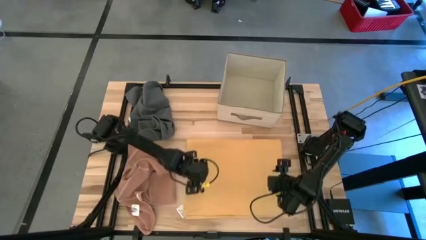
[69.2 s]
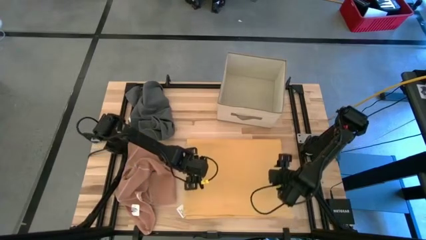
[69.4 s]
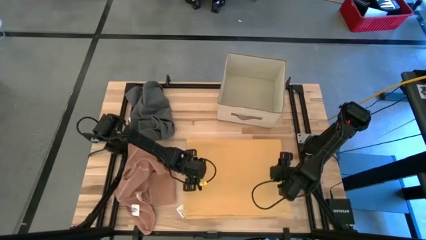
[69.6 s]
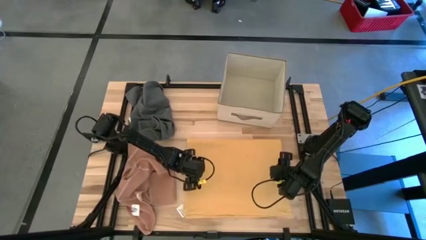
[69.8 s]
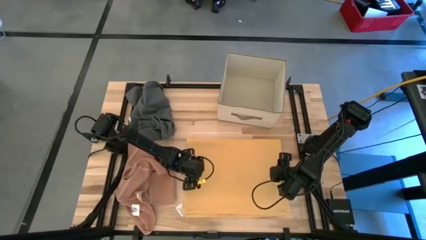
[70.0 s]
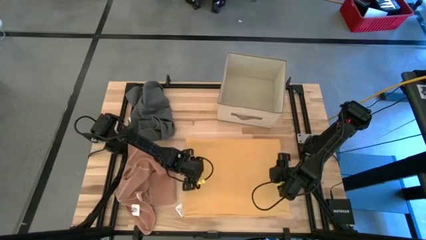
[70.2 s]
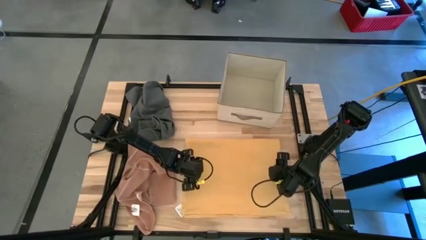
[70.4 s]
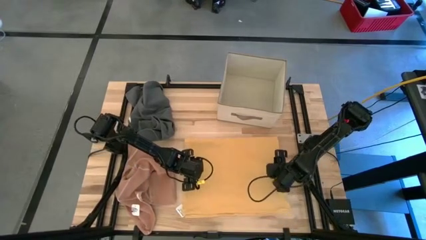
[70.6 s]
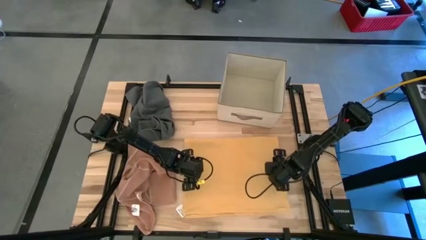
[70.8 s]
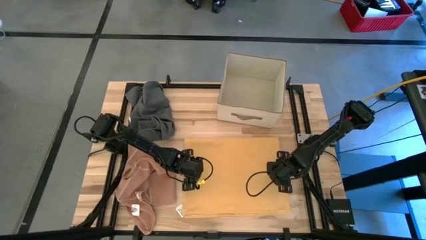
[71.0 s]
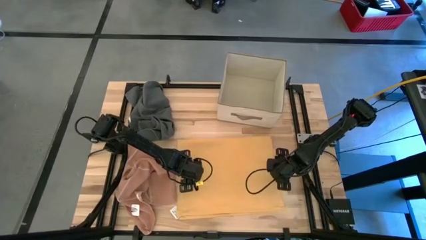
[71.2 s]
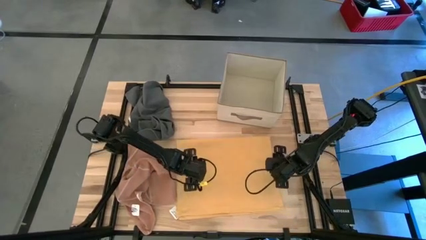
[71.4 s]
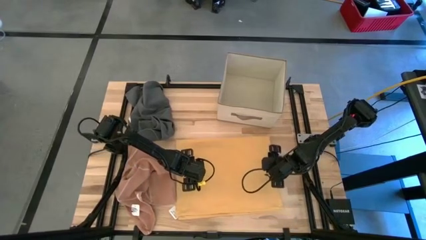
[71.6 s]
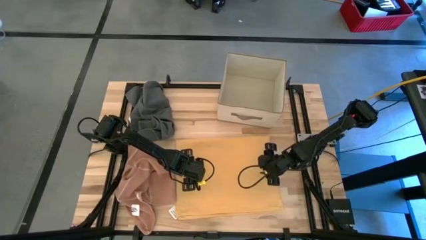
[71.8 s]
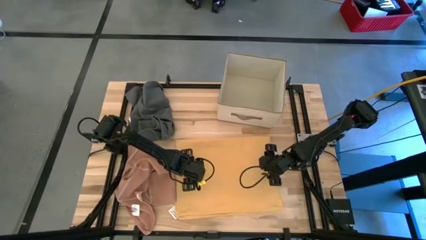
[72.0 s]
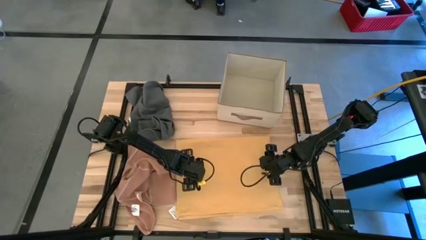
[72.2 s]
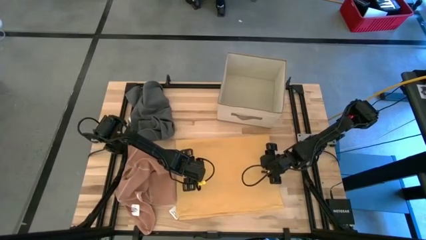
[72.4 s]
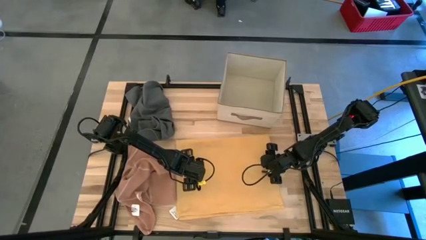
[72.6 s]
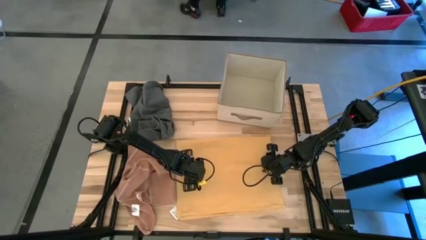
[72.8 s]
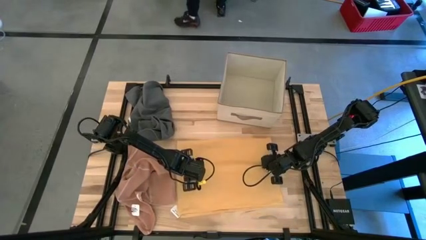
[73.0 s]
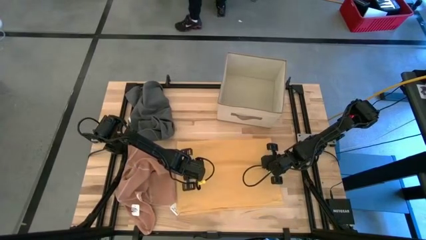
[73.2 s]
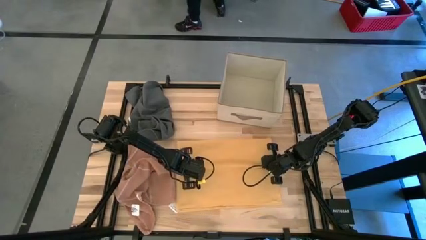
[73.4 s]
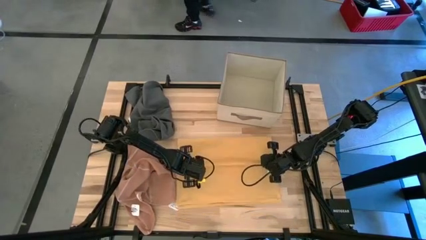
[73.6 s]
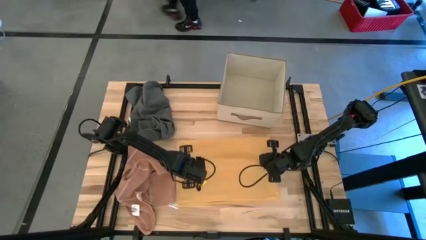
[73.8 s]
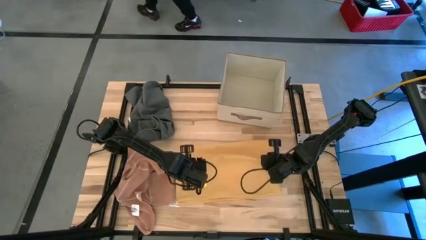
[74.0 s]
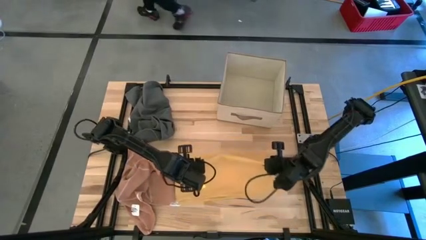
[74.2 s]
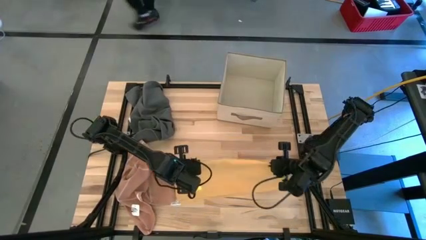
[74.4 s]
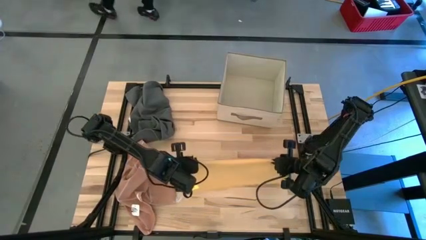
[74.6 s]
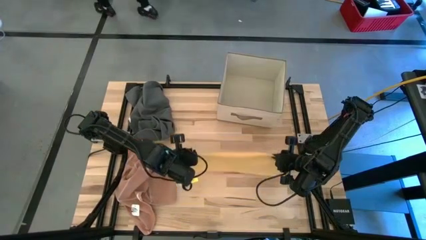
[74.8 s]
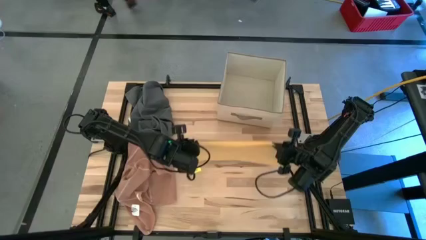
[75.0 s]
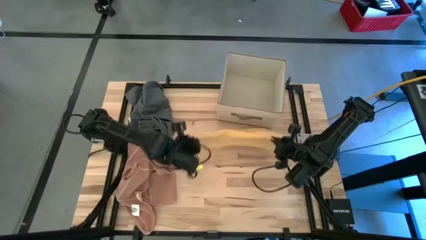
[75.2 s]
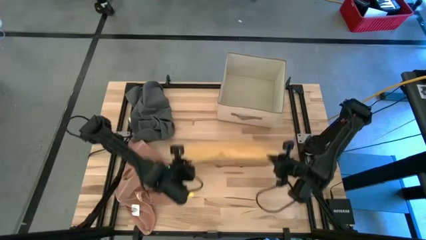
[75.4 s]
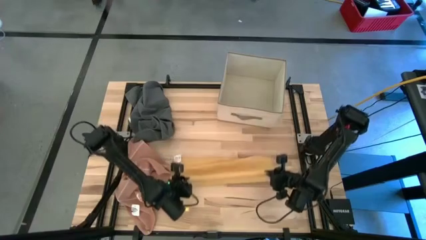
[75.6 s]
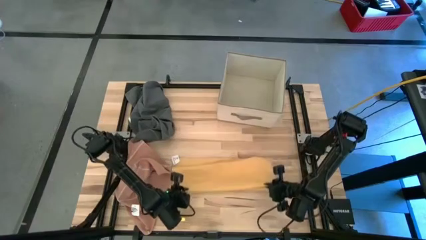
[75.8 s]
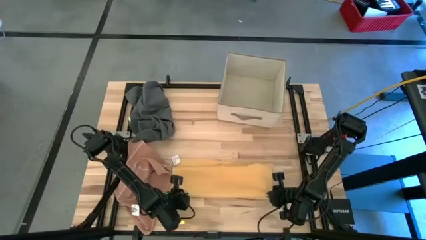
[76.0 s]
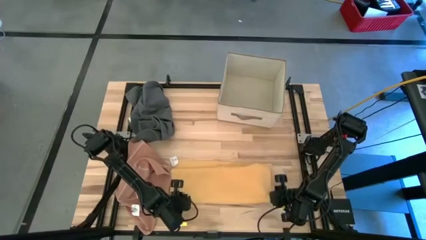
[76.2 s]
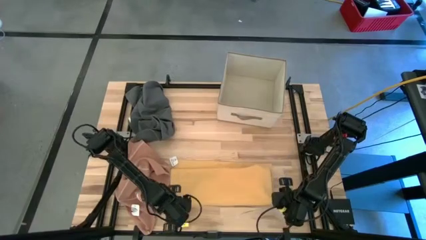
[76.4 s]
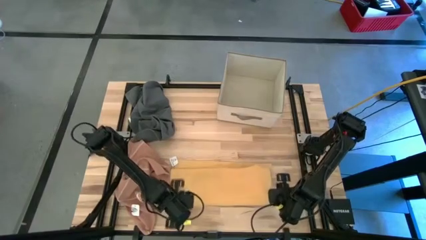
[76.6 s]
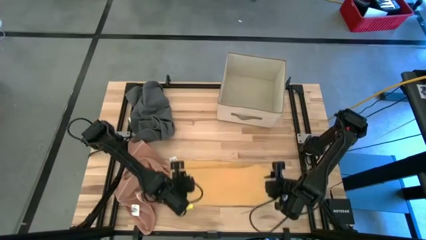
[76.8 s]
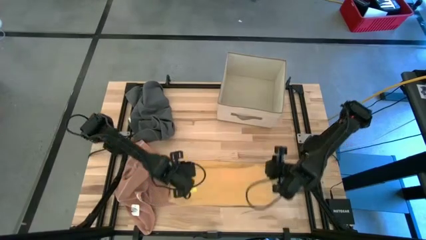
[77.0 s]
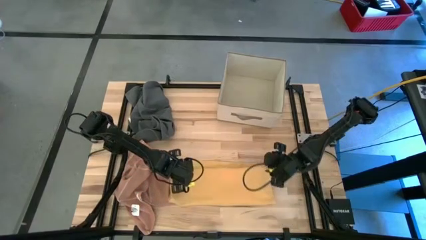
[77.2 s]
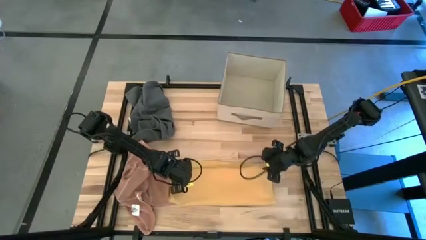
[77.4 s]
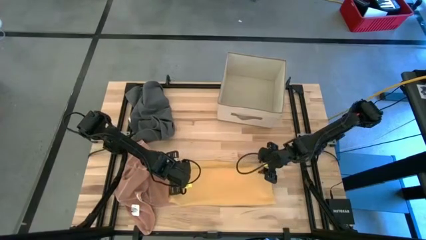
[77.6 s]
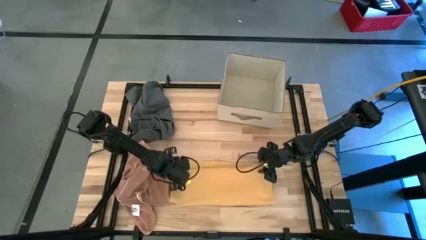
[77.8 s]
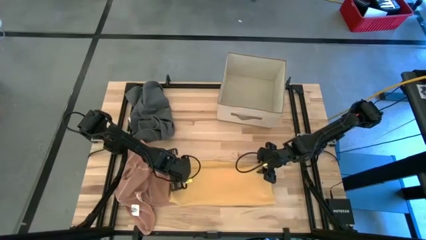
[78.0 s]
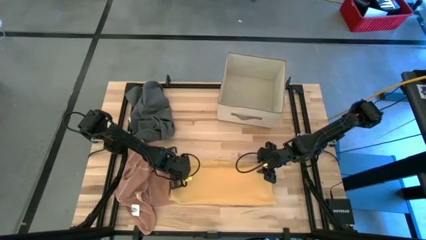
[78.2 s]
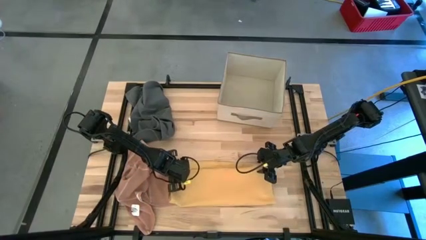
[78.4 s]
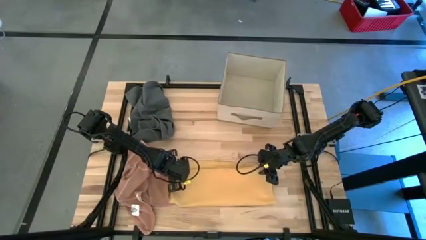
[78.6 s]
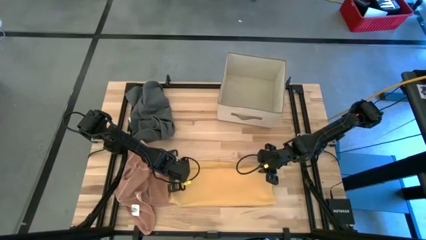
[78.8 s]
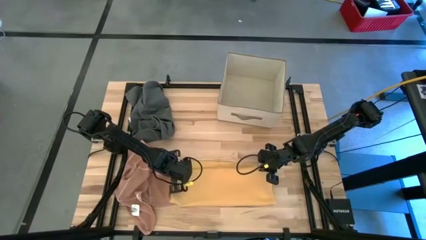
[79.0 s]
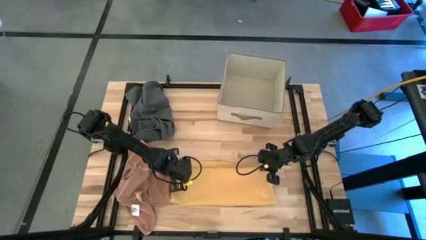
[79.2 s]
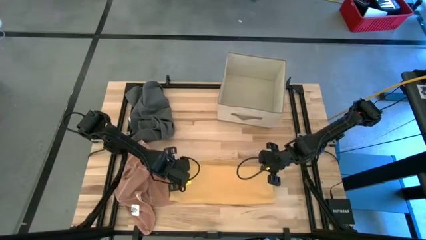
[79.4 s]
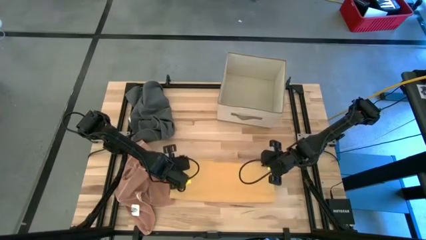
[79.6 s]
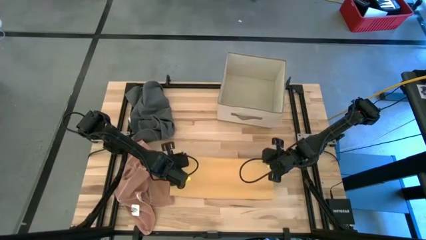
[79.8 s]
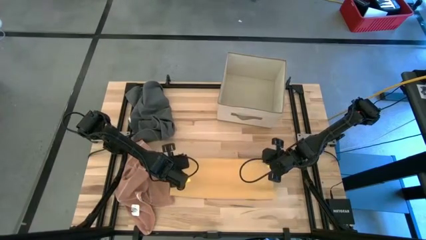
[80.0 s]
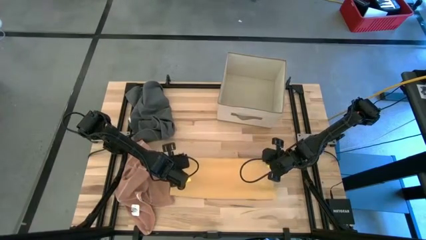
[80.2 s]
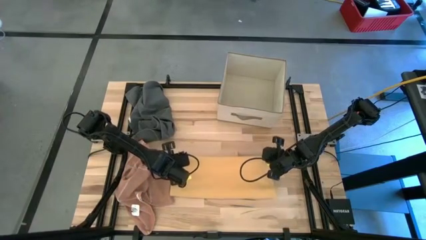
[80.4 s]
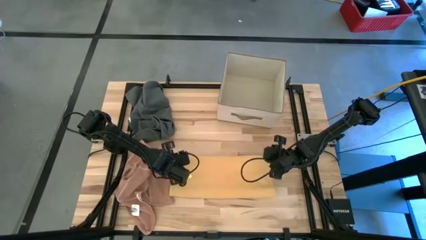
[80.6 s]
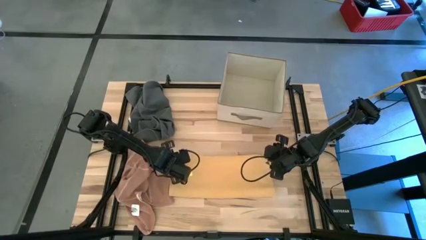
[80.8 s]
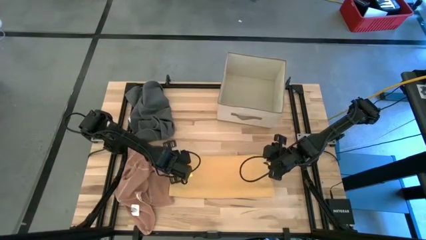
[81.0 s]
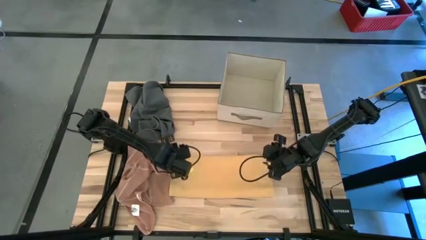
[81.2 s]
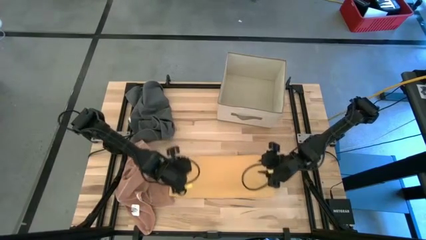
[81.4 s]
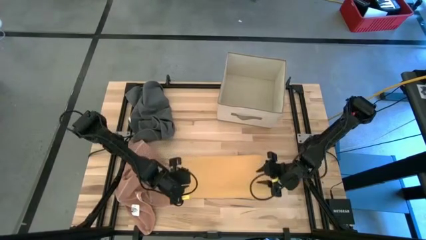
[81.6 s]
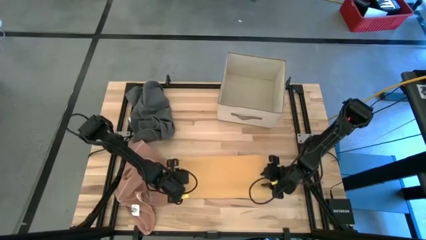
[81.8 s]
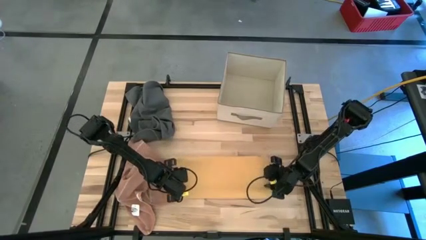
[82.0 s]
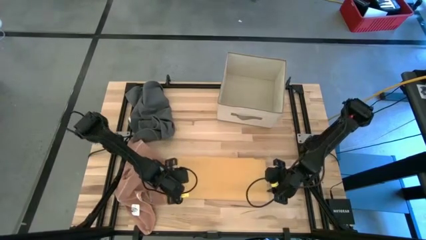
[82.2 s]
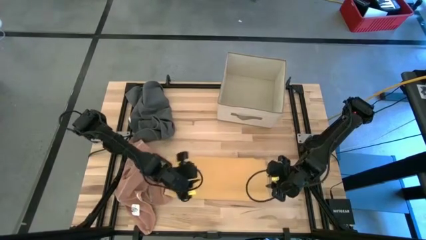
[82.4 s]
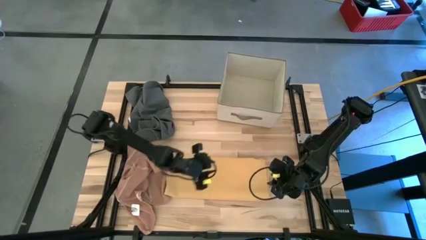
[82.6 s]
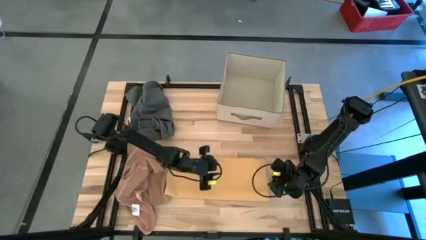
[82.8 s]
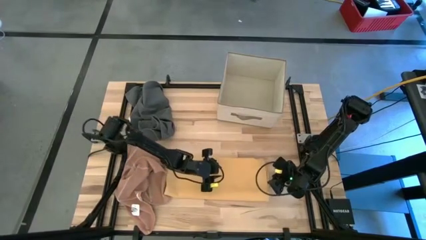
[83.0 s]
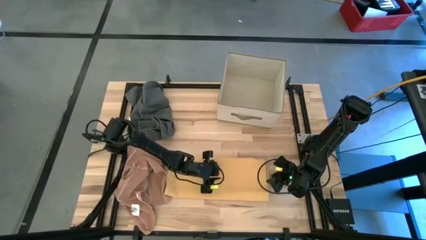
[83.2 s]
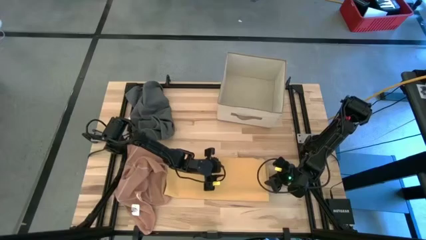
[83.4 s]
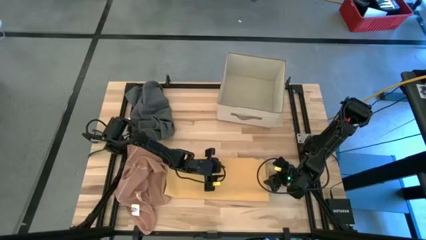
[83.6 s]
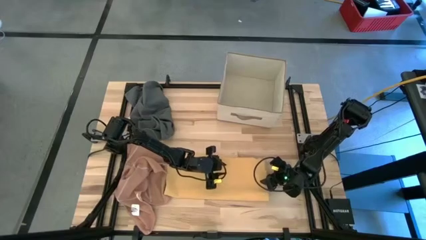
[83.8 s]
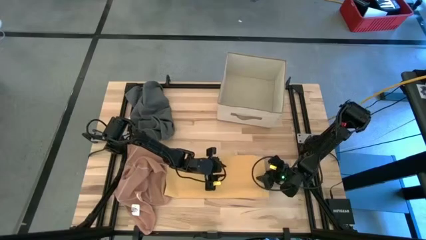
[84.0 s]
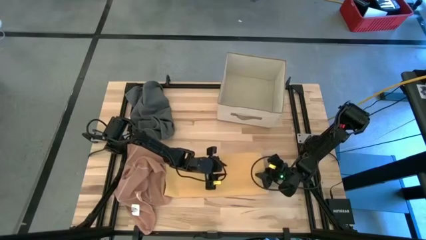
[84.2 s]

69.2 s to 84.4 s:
Task: Fold towel
Fold the yellow towel

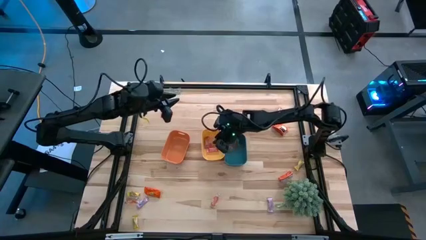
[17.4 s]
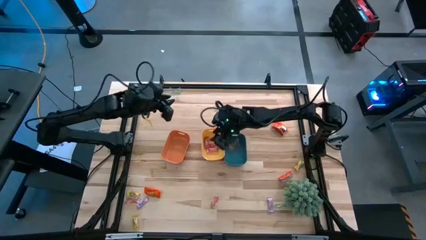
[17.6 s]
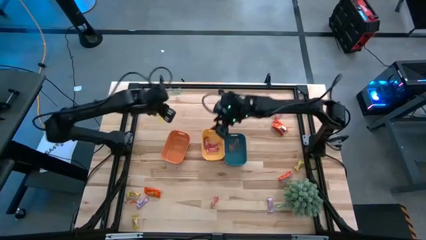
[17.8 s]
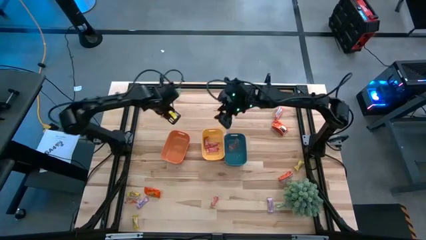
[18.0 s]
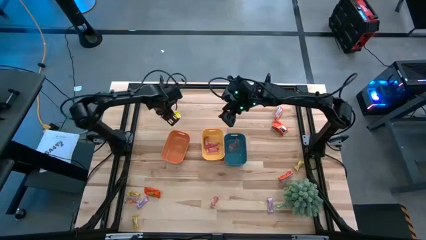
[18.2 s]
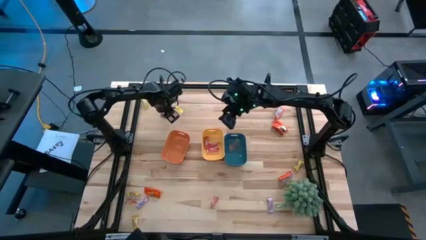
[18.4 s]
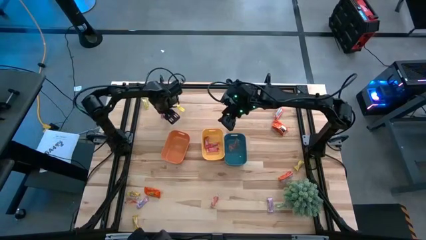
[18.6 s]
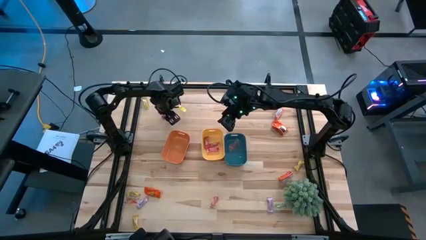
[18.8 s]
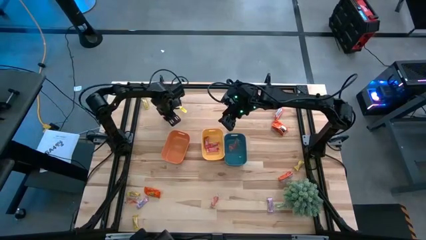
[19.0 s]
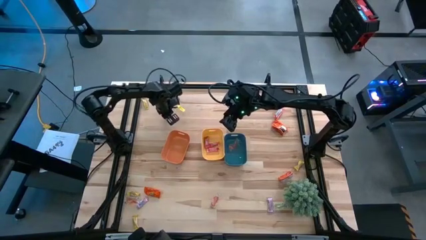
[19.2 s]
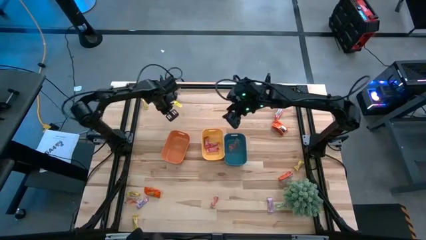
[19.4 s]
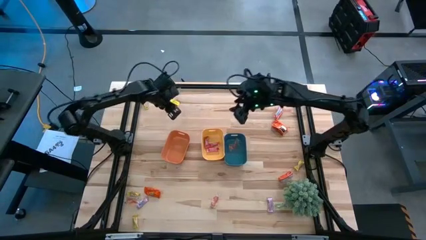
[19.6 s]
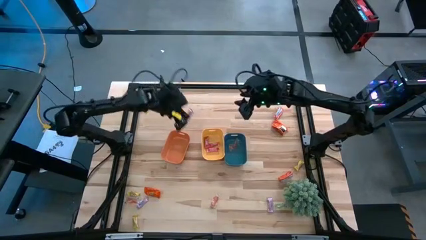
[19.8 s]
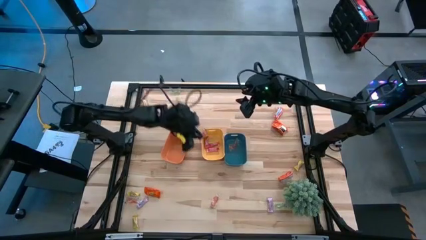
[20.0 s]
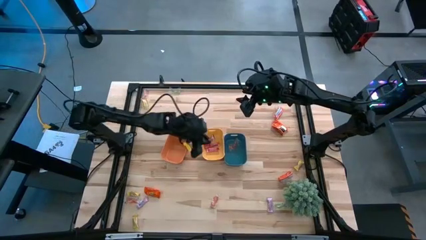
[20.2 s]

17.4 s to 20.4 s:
Task: Sort candy
Put the red candy into the yellow bin
